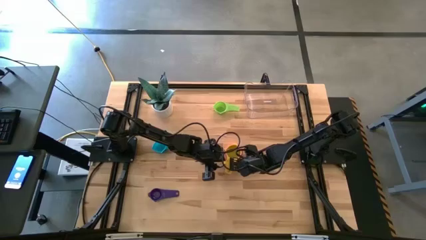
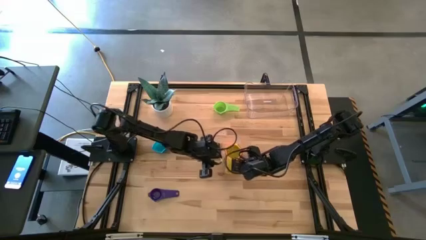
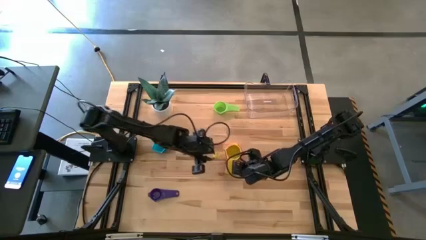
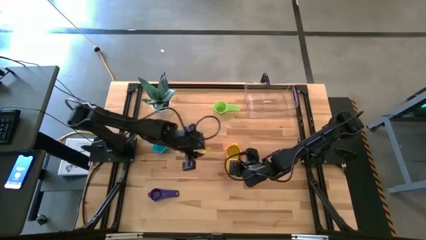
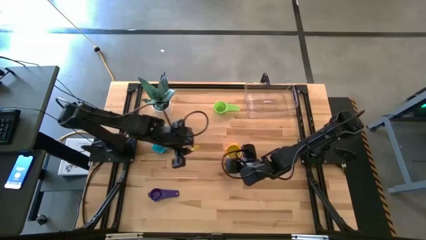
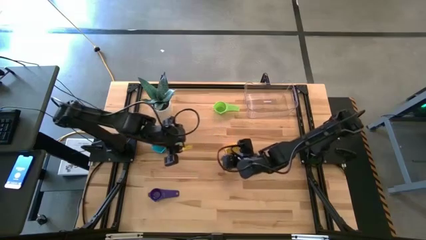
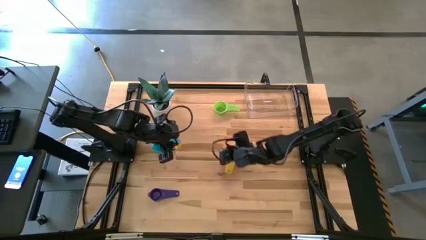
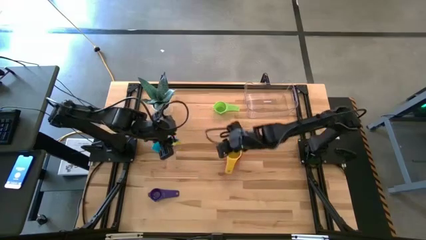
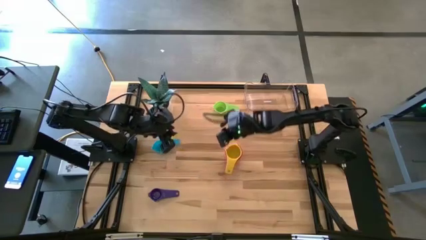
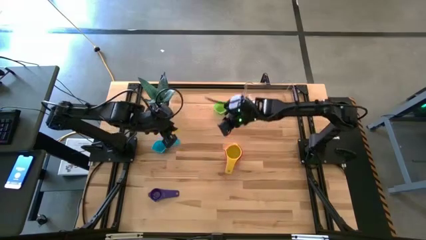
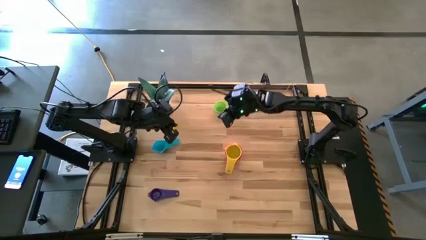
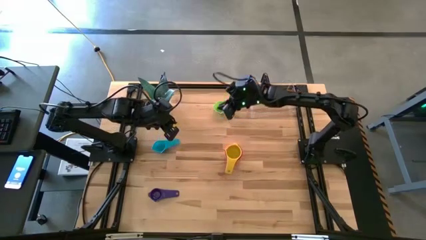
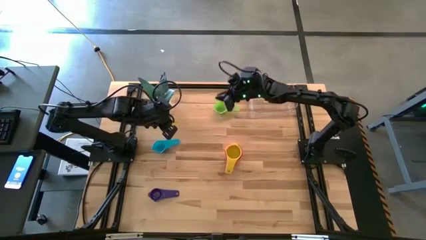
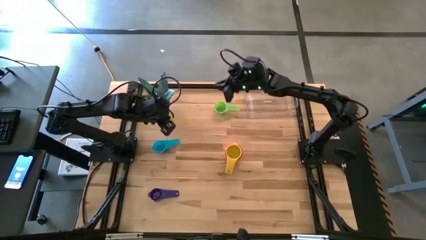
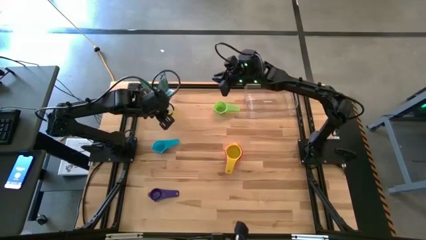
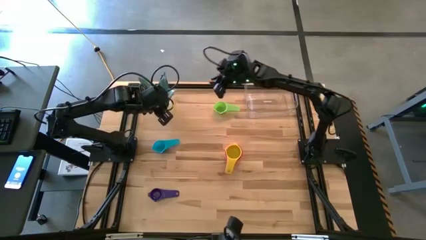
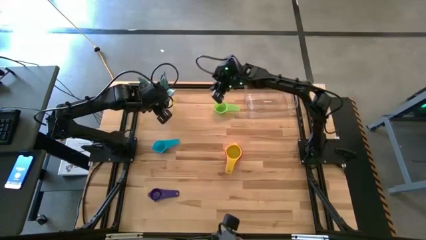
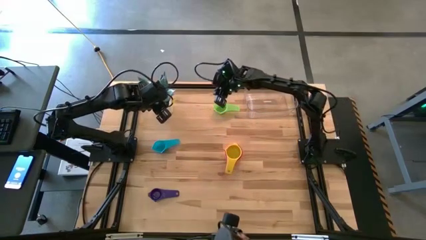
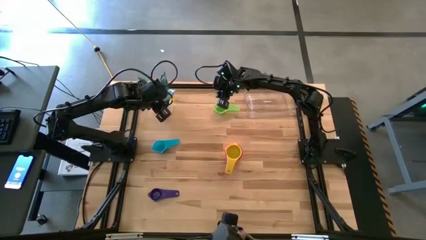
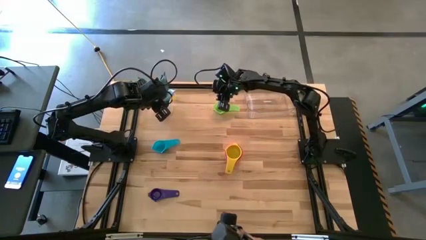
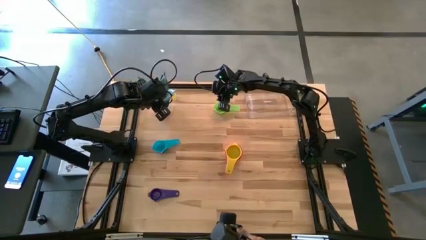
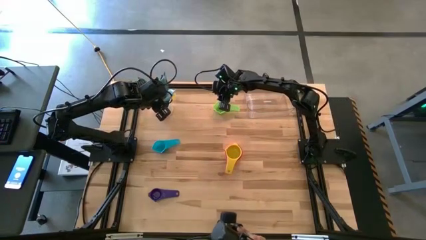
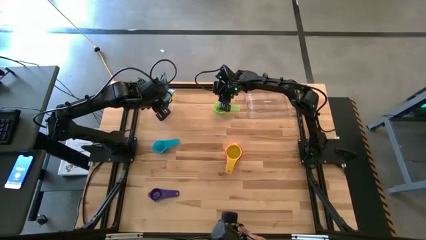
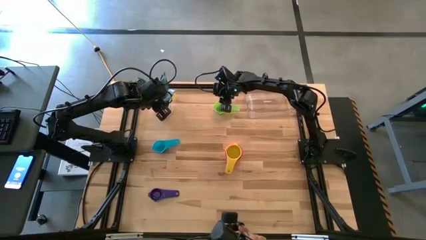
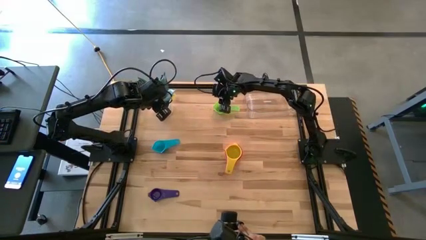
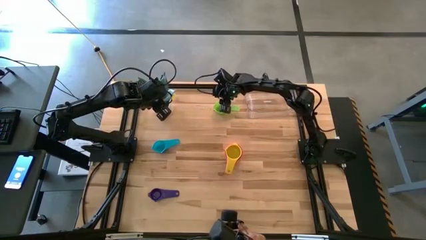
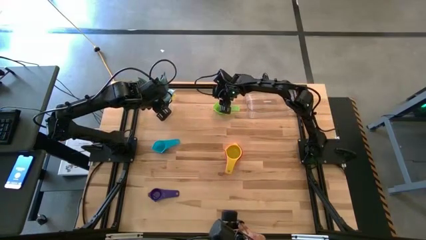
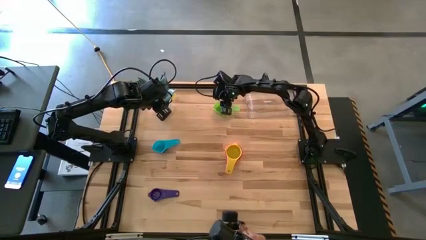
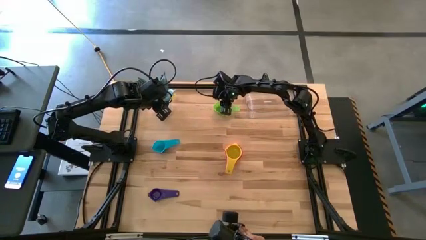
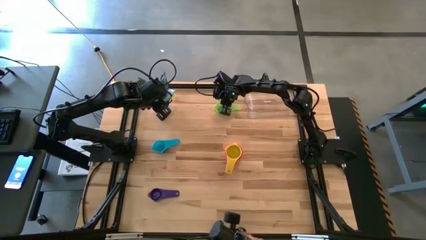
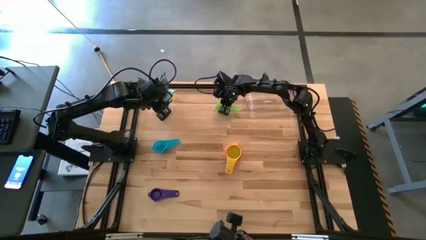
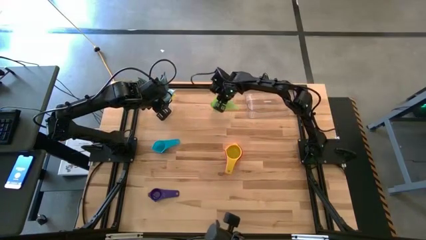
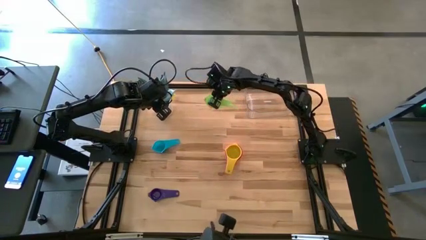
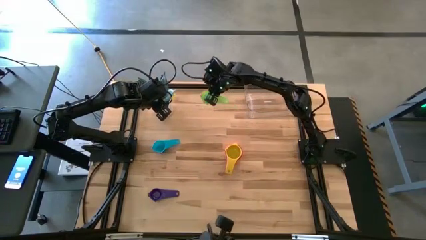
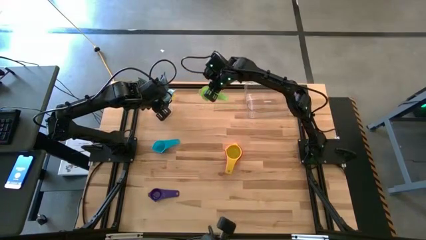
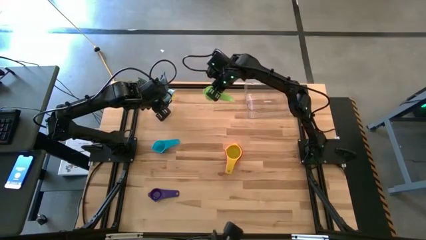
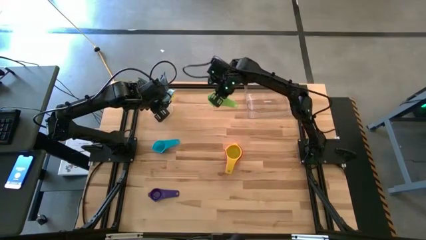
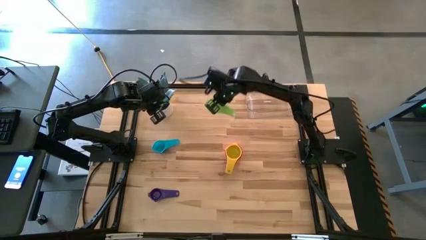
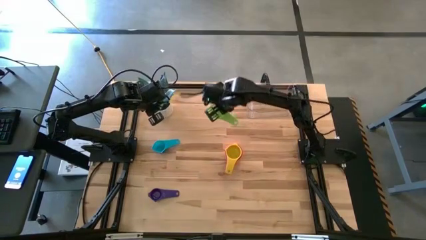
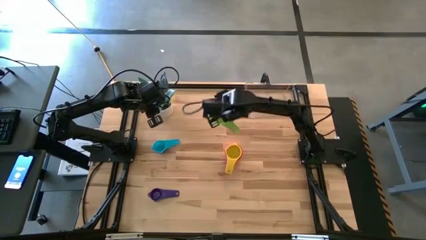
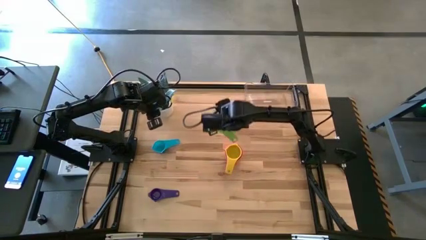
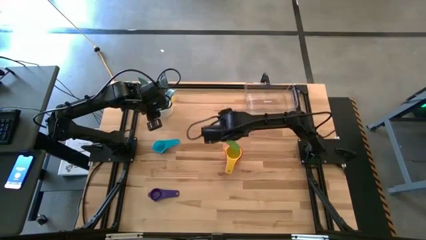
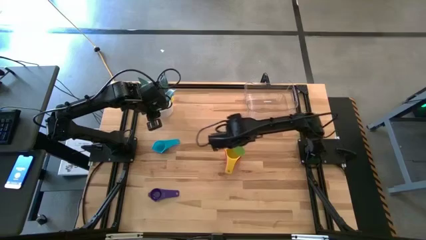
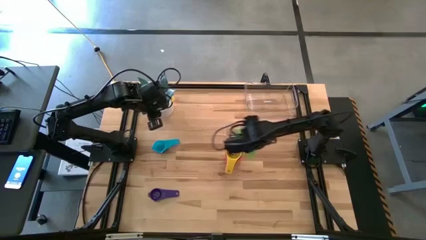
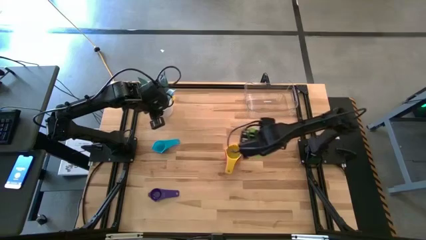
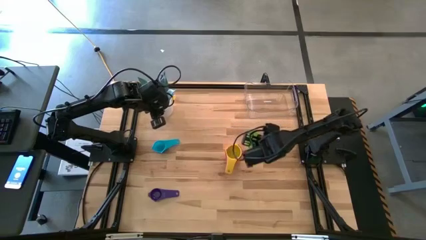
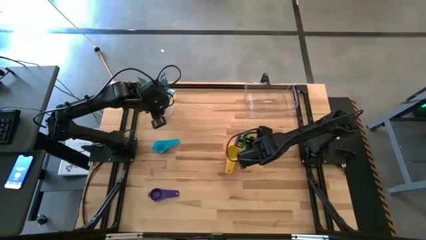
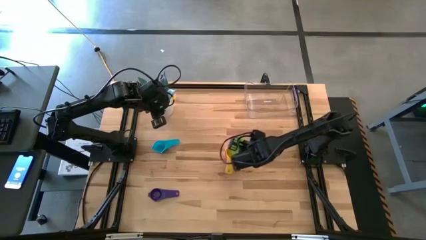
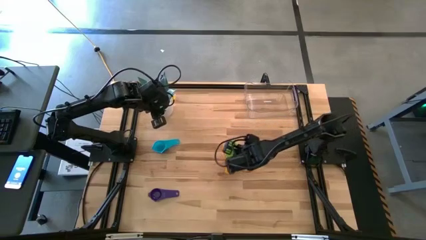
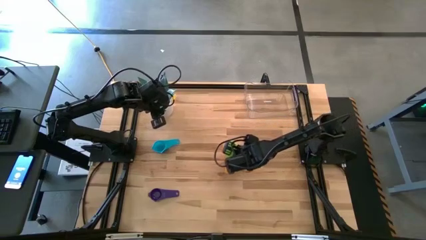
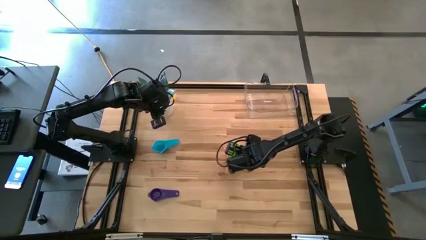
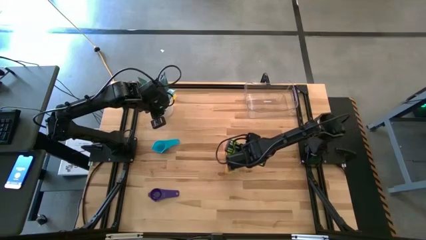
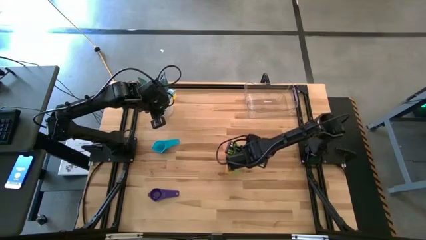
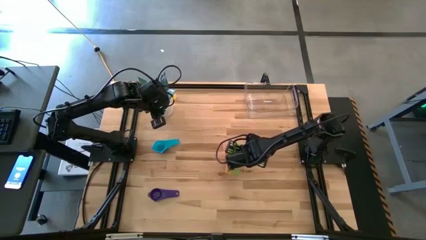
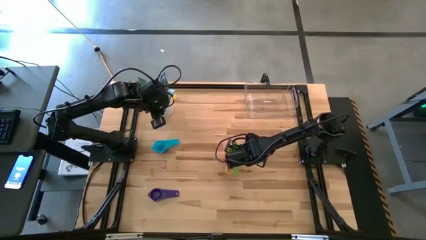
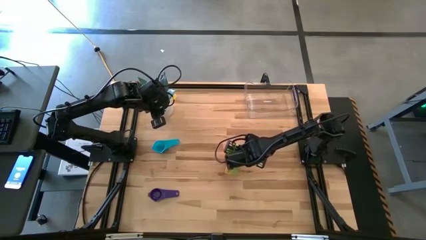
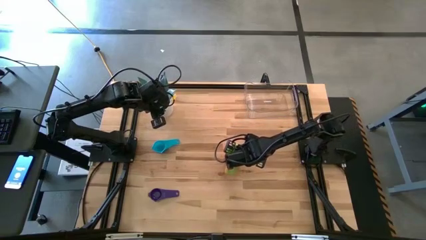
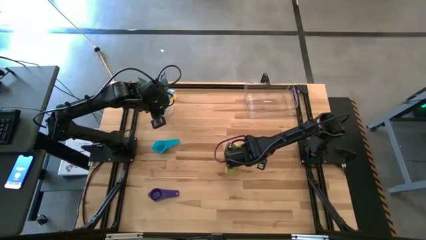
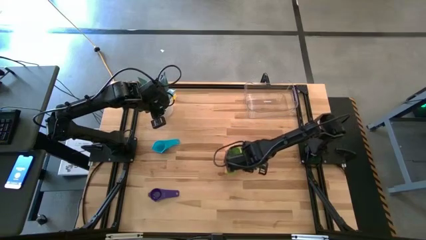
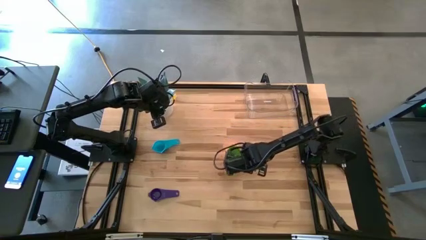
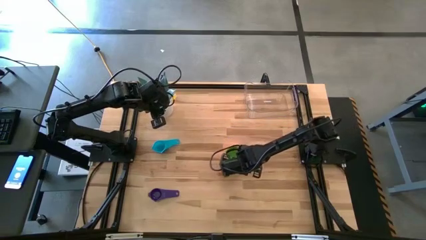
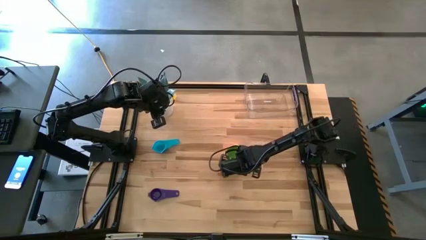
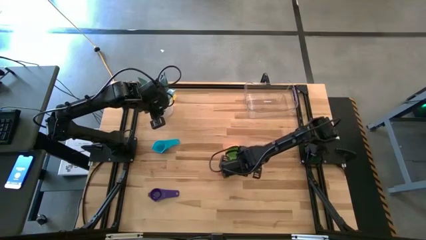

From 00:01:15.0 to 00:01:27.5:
Task: Nest measuring cups in basket
Stack the green measuring cup on top of the yellow measuring cup

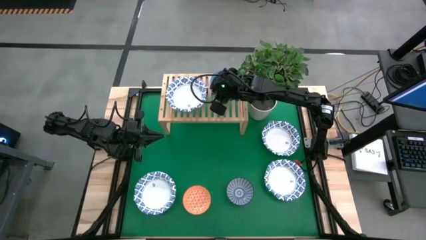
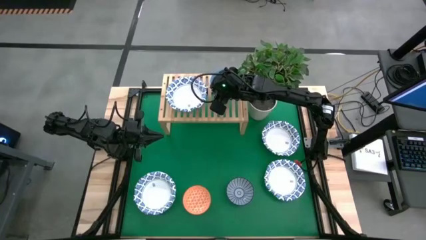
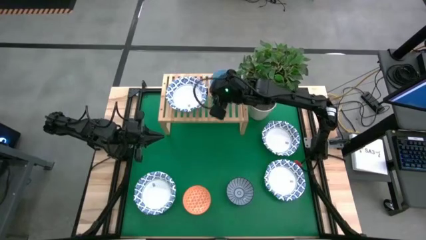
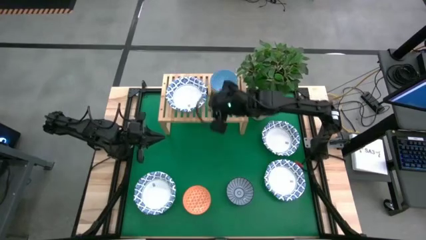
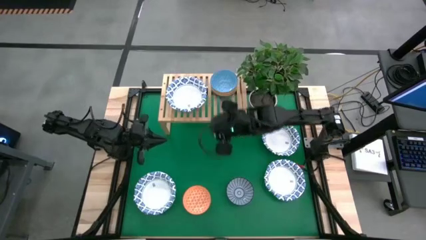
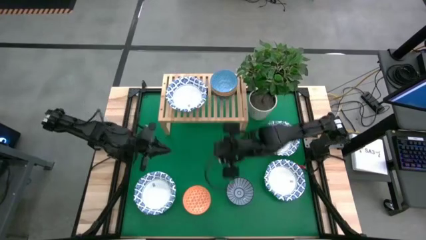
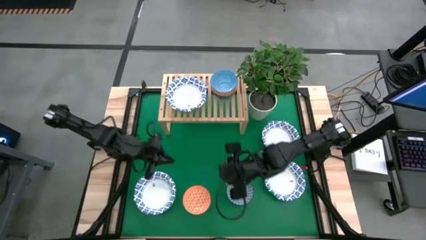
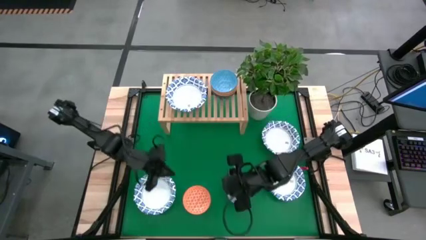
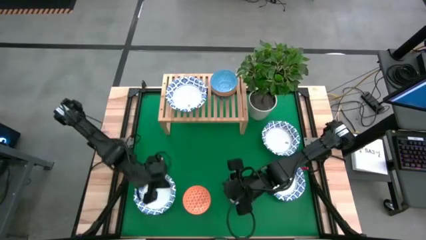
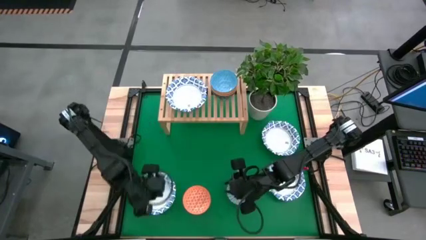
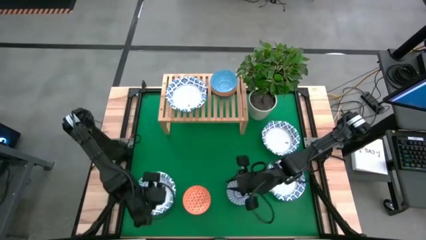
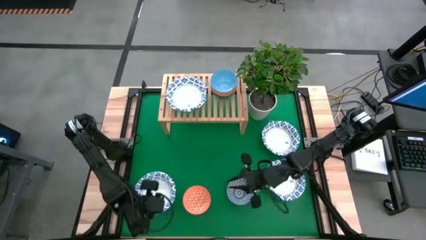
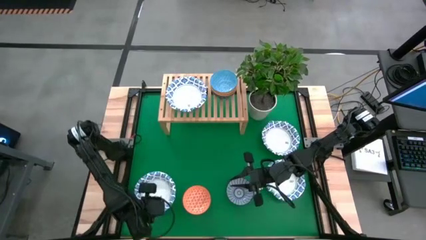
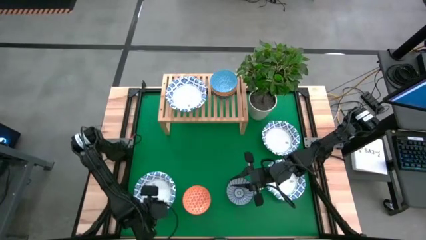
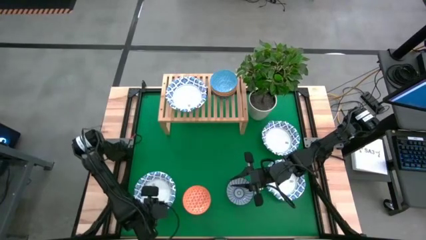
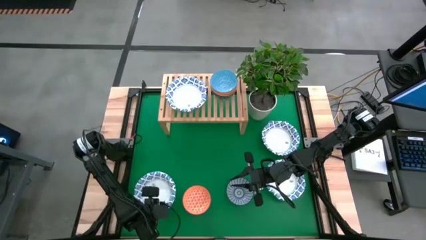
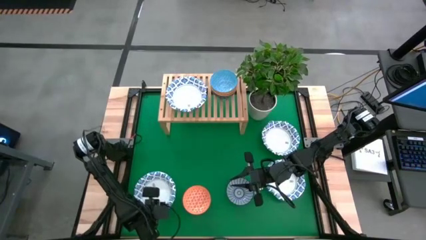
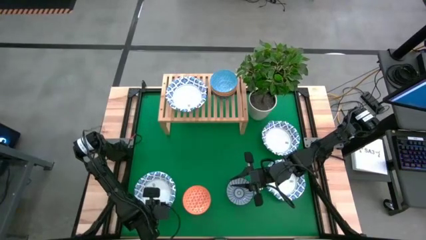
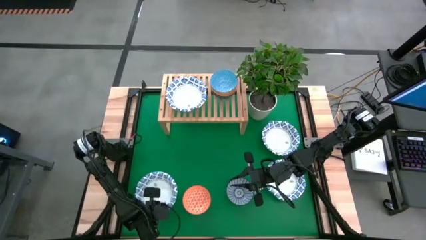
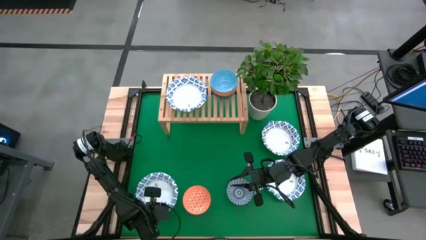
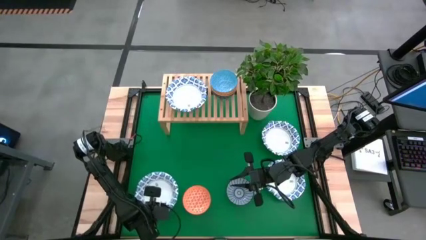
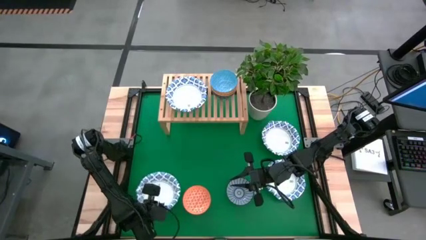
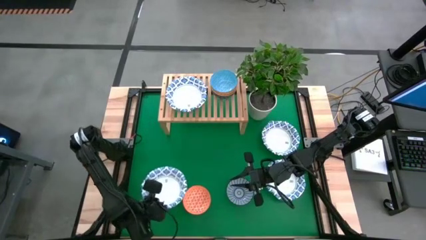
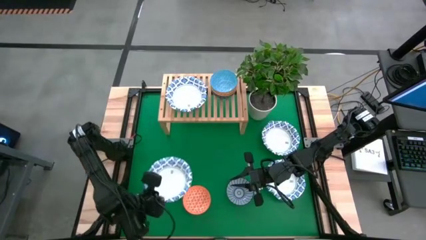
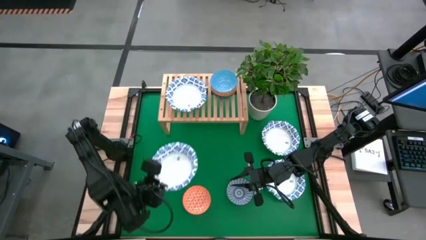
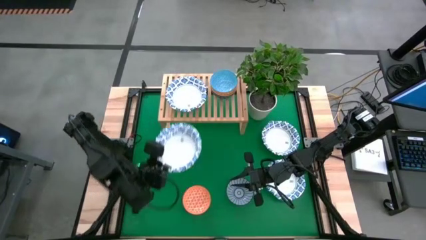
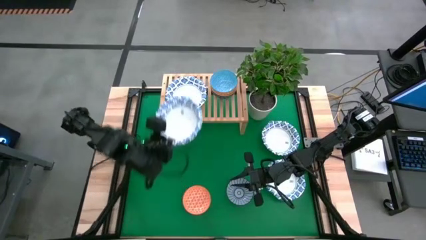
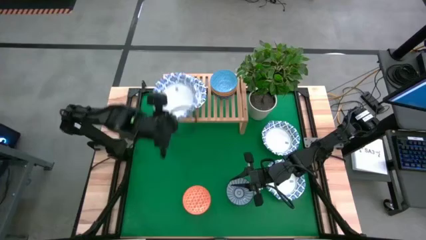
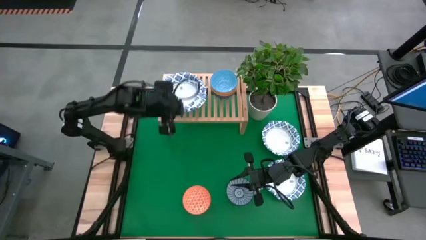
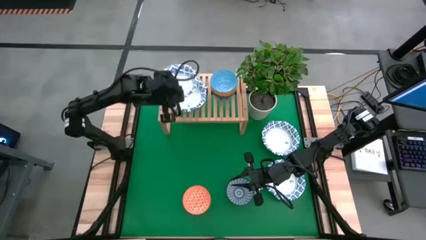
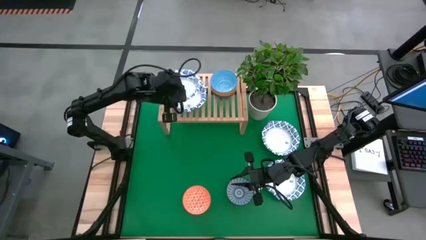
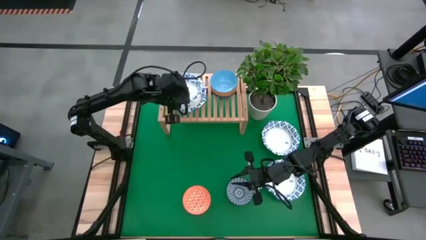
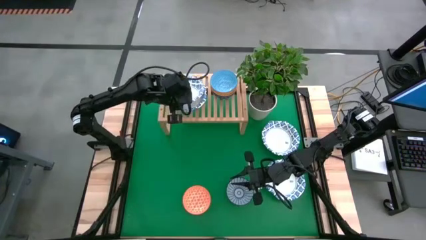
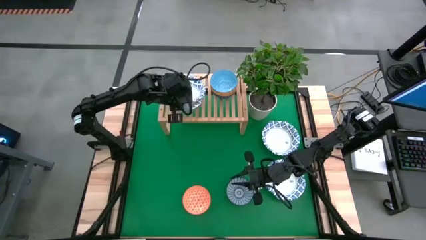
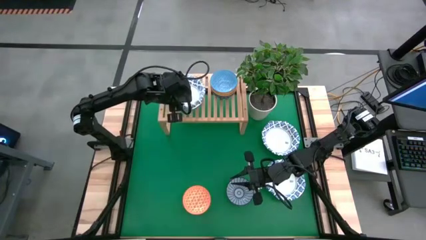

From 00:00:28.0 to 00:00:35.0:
Task: Place and stack bowls onto a shelf
Stack the big white bowl on the big white bowl on the shelf
